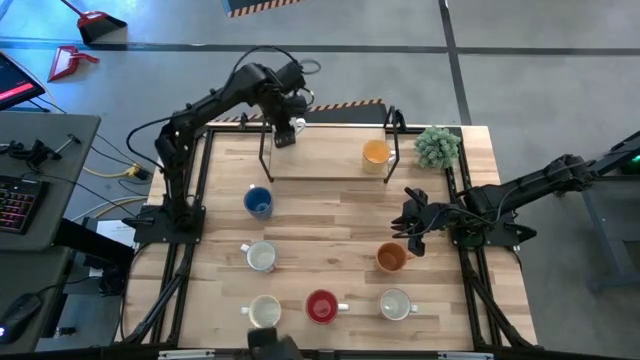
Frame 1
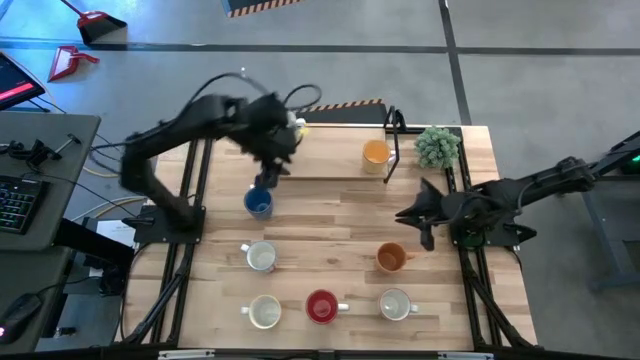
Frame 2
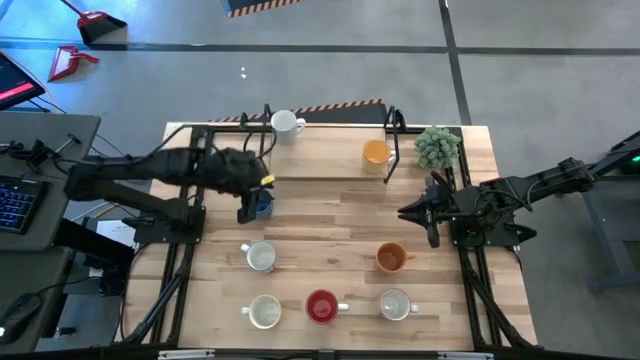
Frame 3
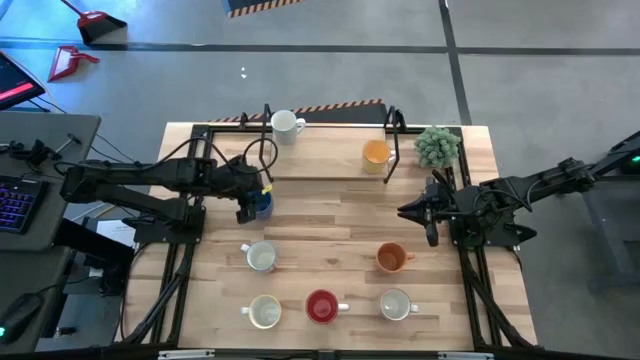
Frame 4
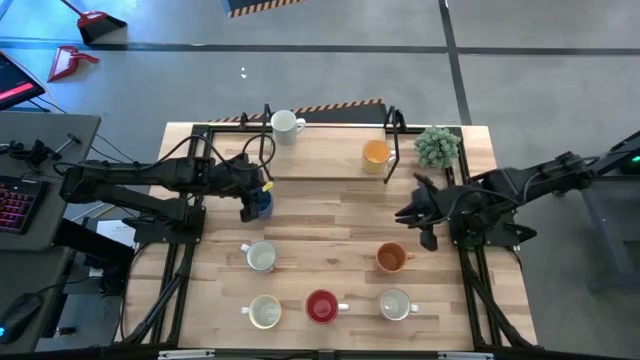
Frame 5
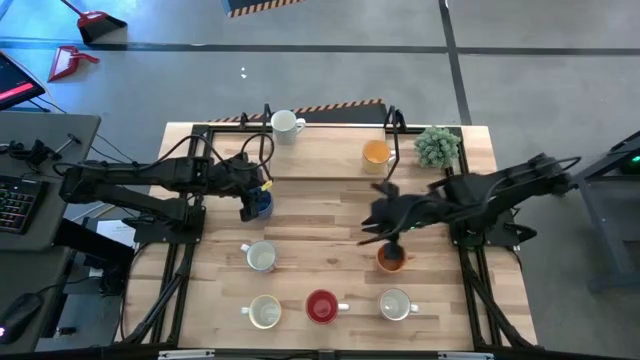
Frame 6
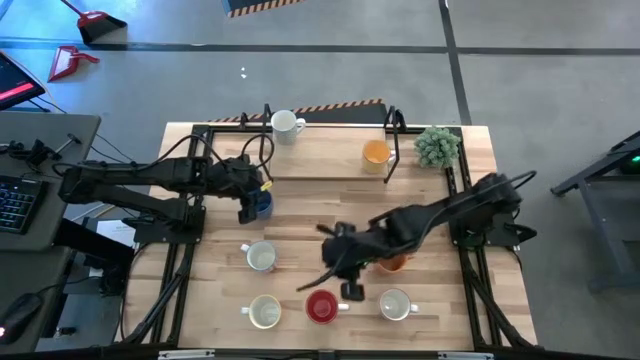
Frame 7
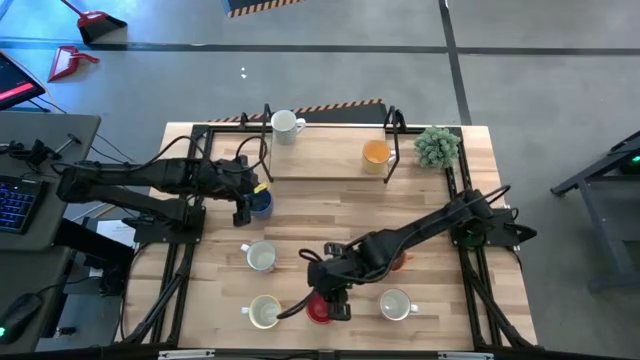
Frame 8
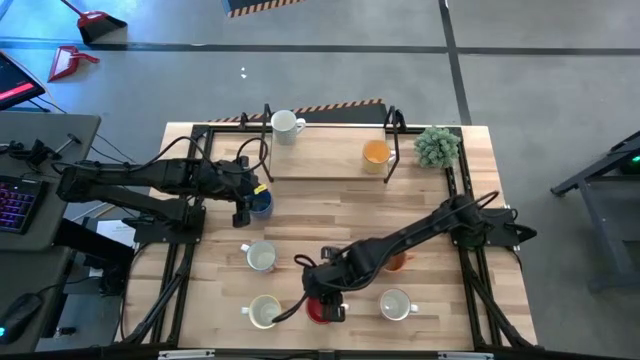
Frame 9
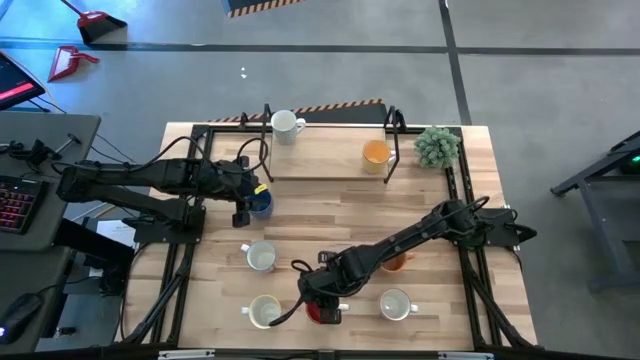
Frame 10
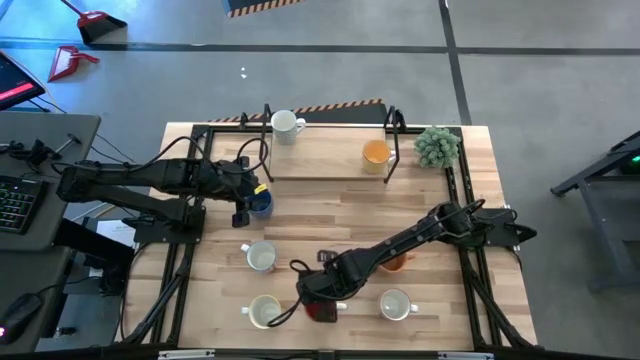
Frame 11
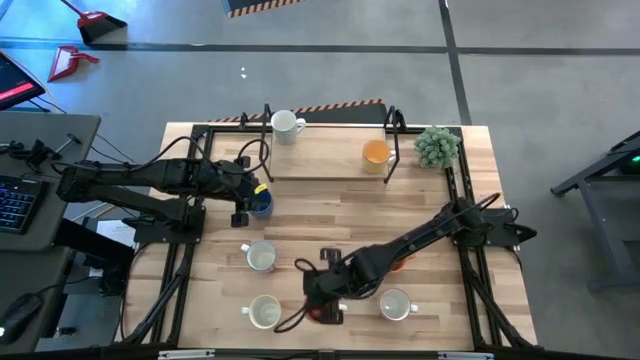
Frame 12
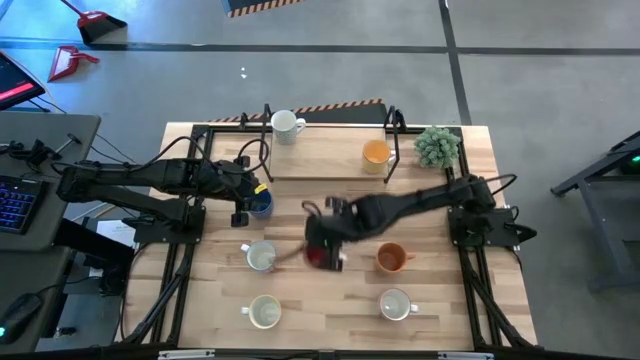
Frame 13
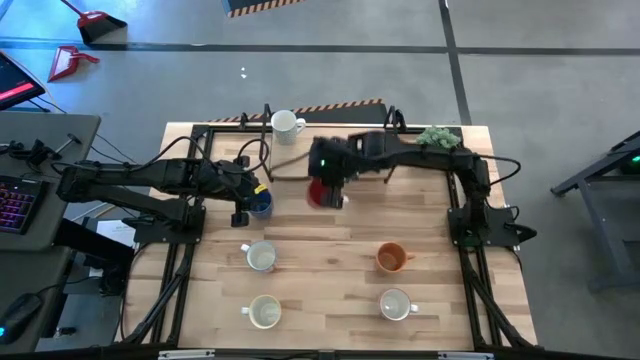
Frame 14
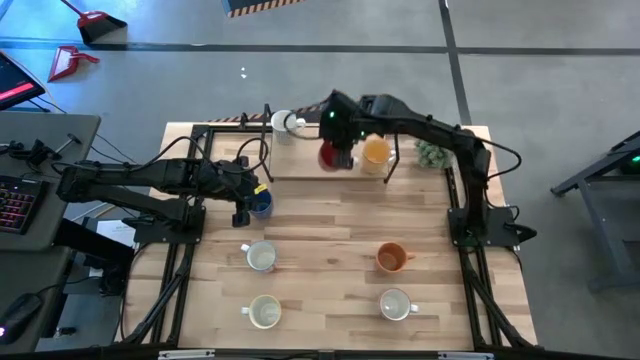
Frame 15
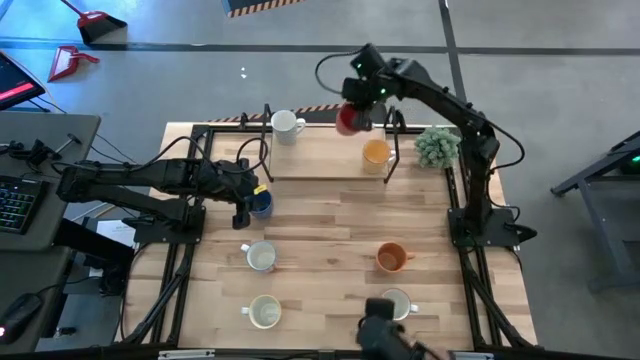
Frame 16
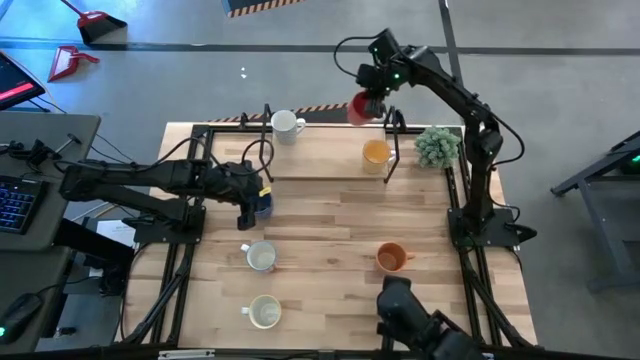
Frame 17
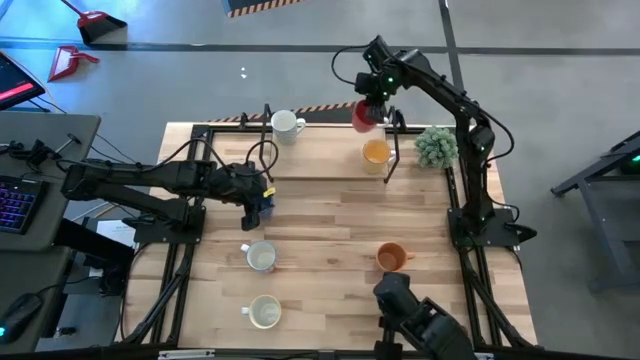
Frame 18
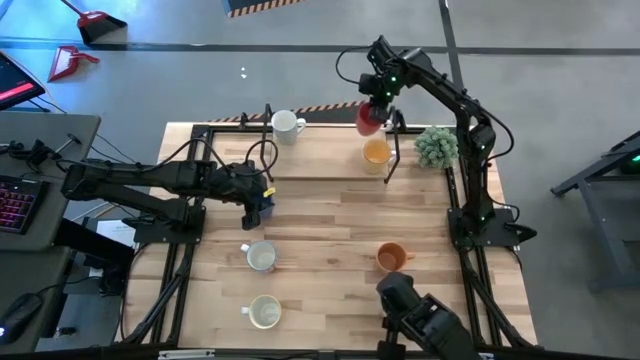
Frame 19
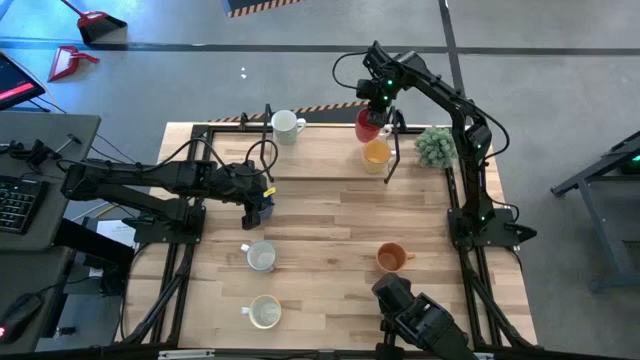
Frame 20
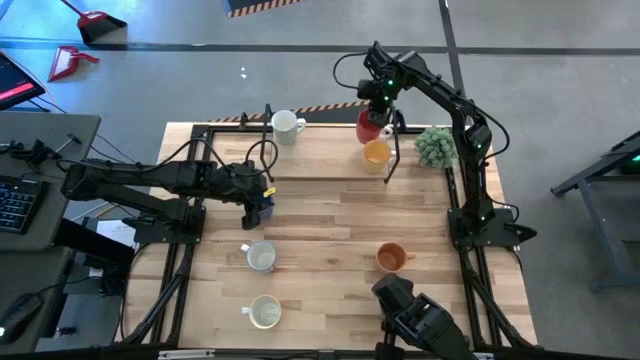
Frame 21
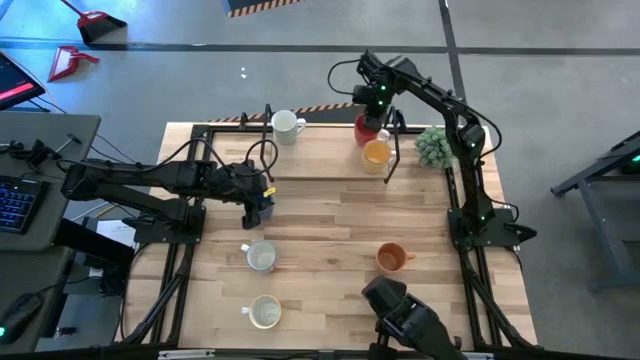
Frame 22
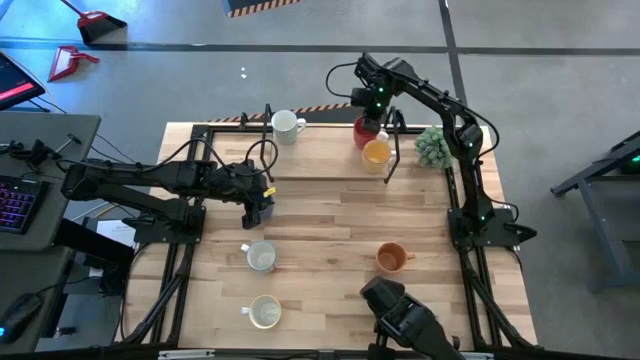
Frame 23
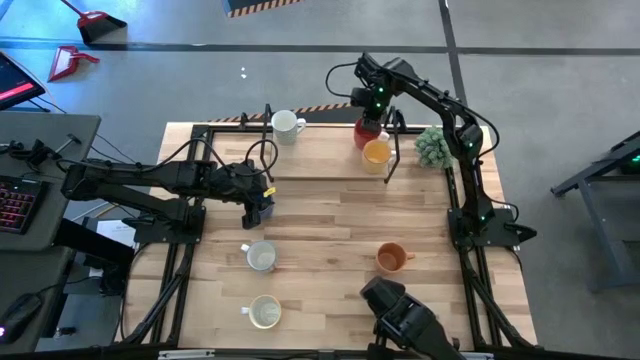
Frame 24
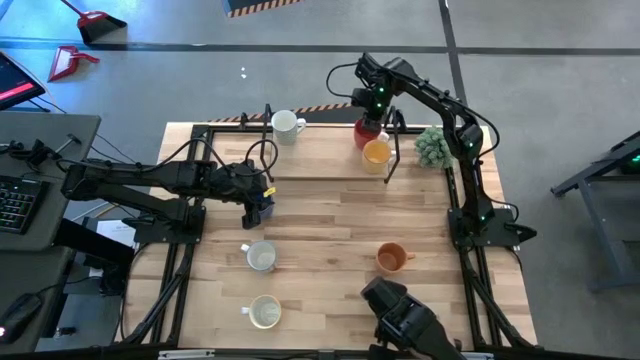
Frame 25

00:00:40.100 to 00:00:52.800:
Task: Place coffee mugs
Put the red mug on the shelf

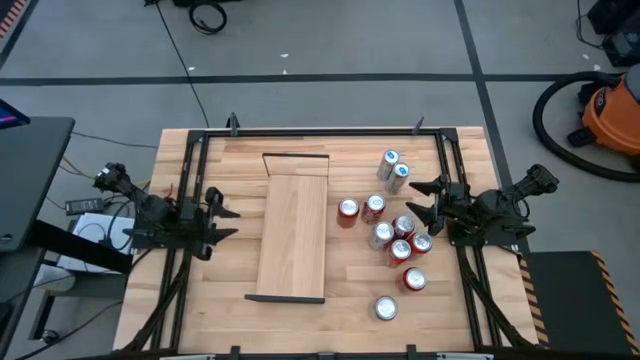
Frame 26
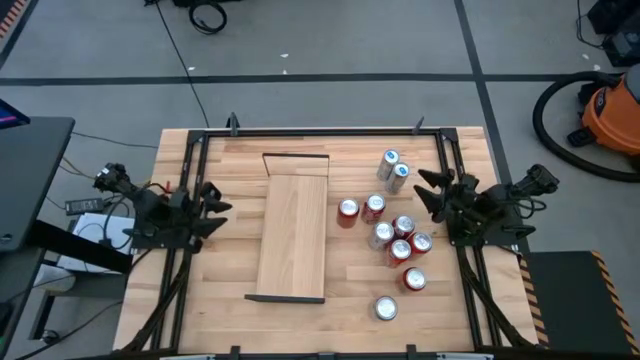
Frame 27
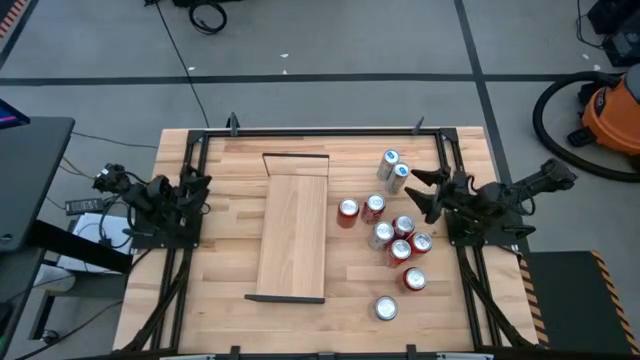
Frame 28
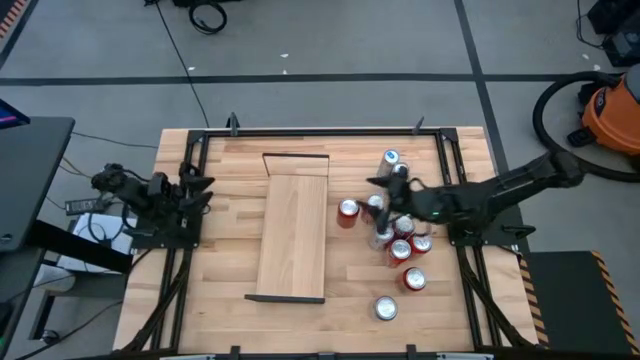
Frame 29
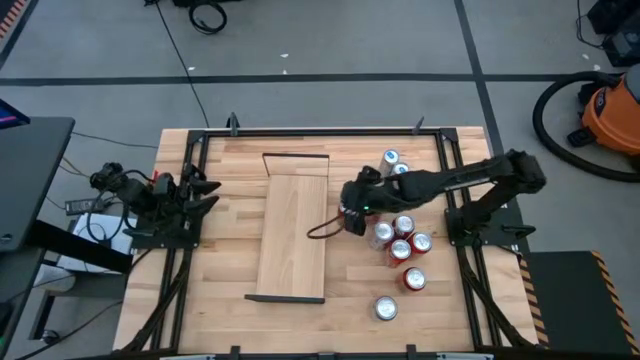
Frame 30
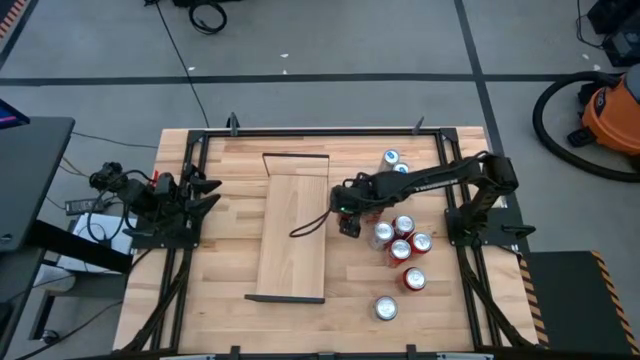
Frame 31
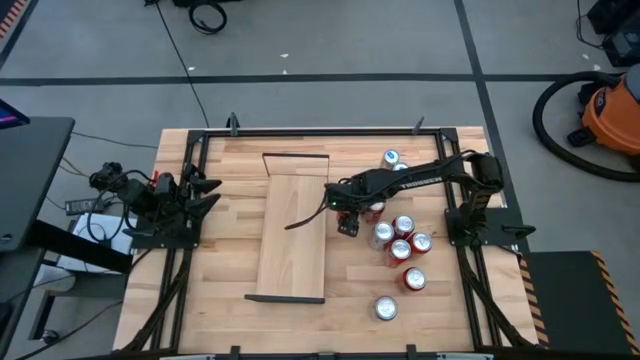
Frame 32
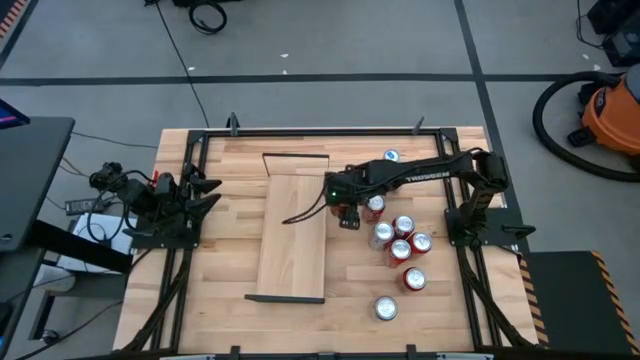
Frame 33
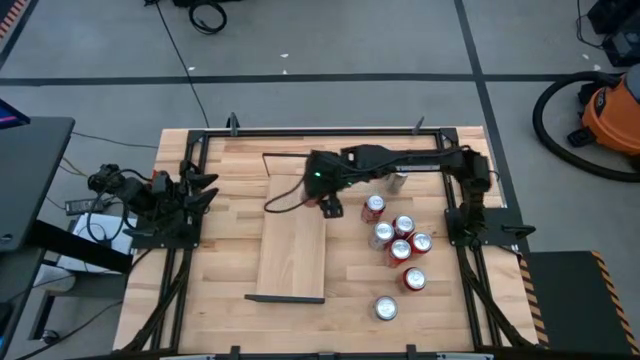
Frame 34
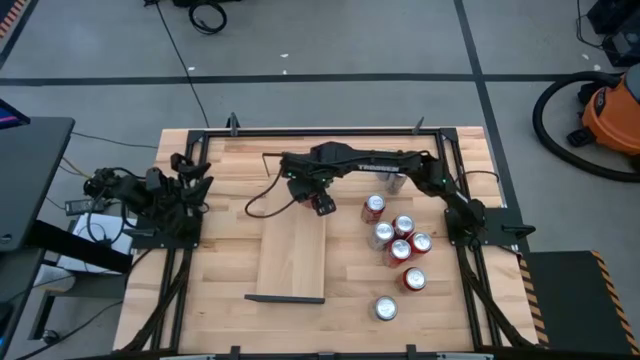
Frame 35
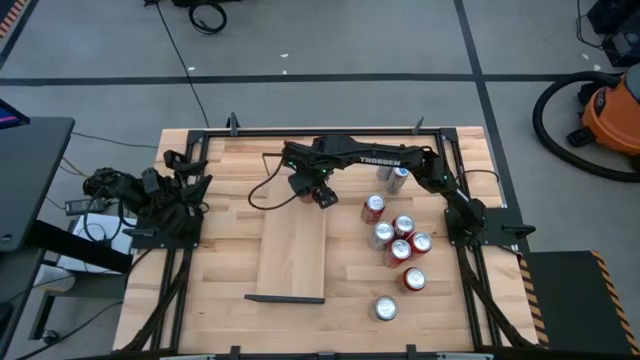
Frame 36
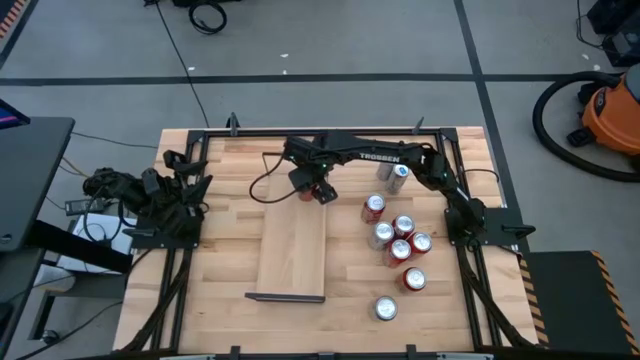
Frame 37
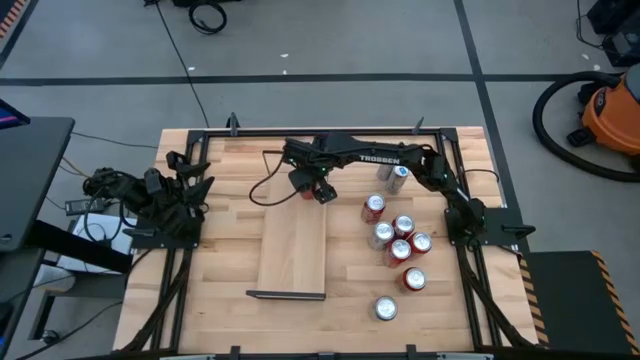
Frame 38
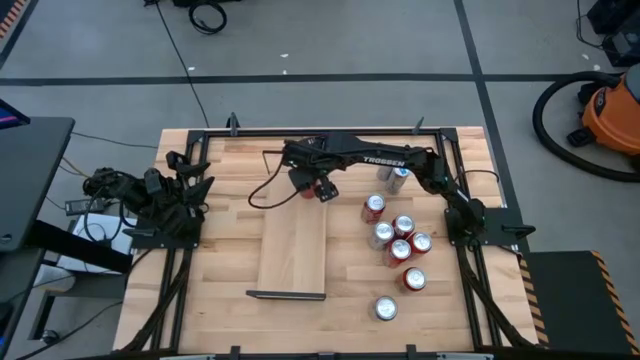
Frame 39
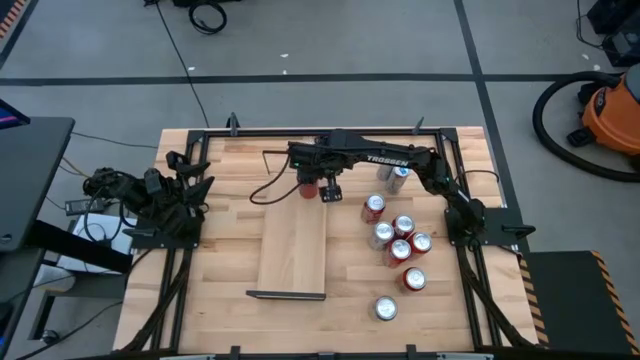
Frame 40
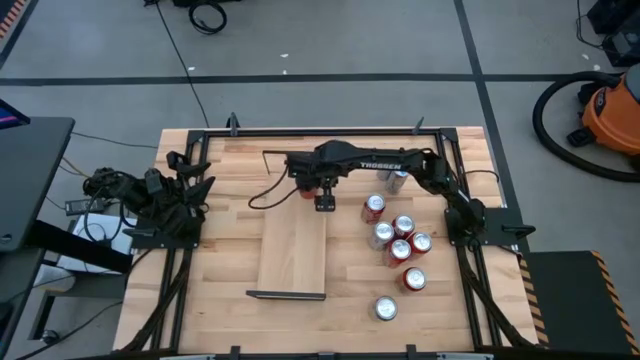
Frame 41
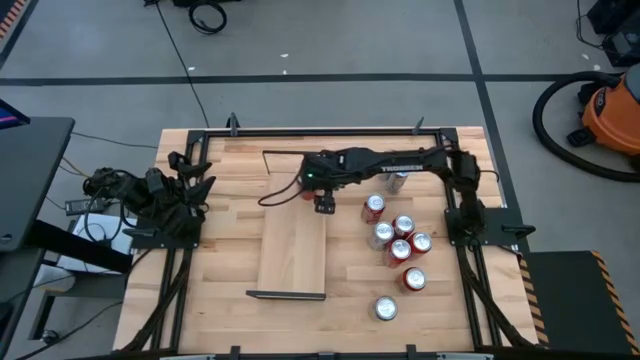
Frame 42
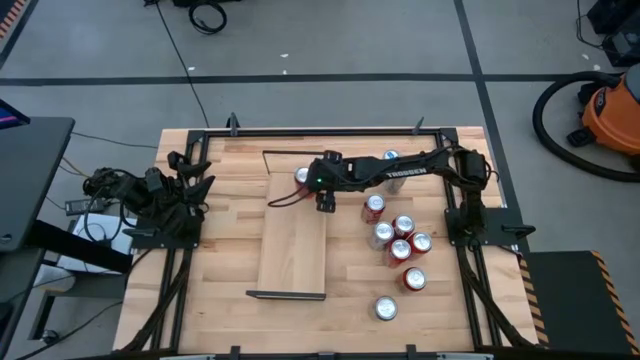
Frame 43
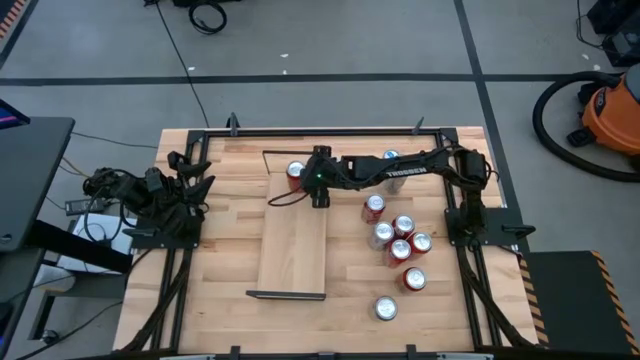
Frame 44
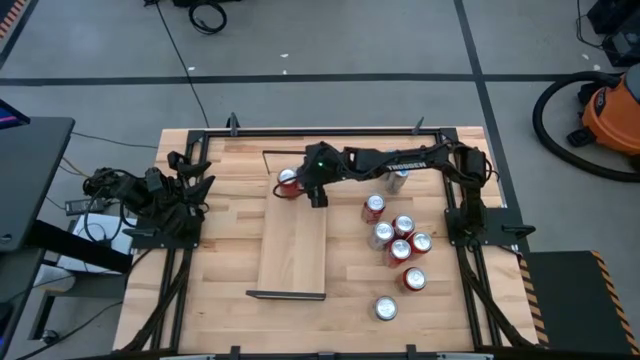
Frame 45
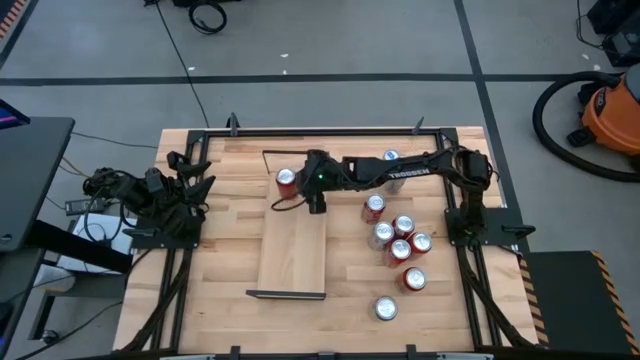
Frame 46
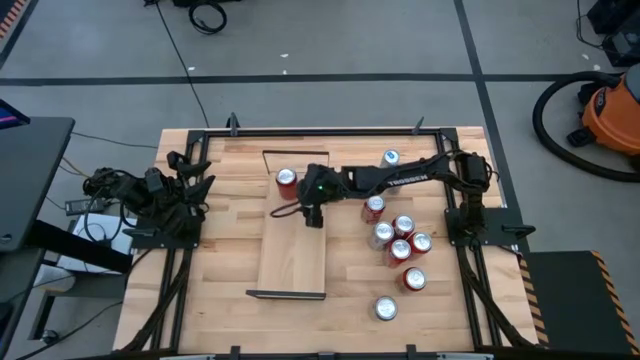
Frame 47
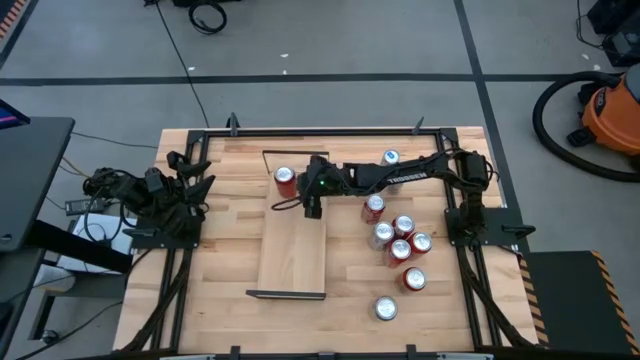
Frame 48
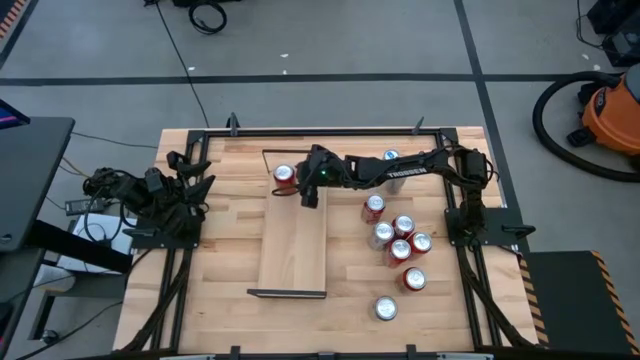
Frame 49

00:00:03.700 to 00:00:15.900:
Task: Place canned beverage on shelf
Put the top red black soda can on the shelf
